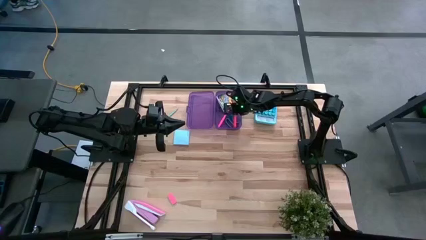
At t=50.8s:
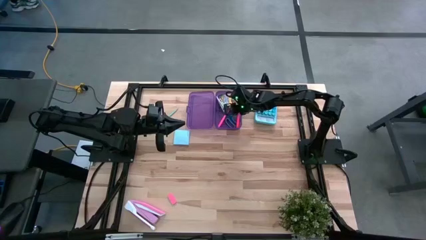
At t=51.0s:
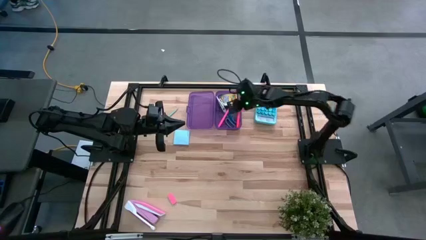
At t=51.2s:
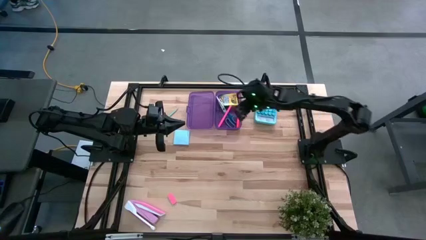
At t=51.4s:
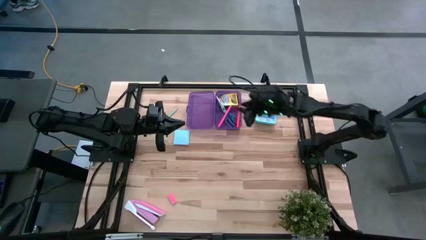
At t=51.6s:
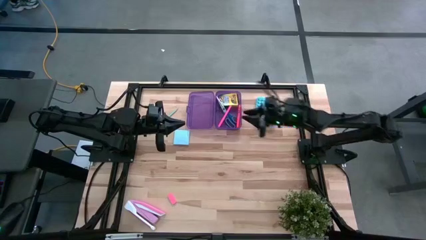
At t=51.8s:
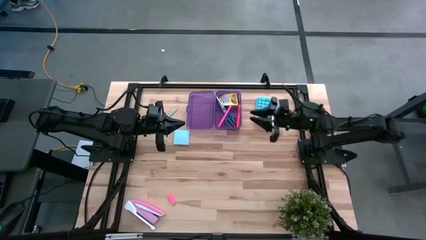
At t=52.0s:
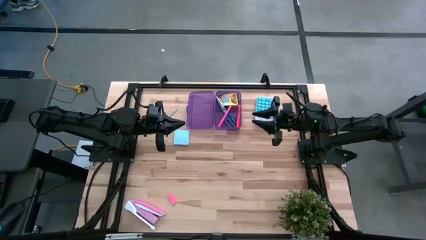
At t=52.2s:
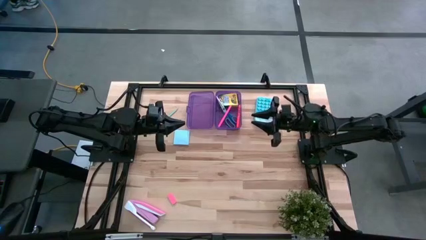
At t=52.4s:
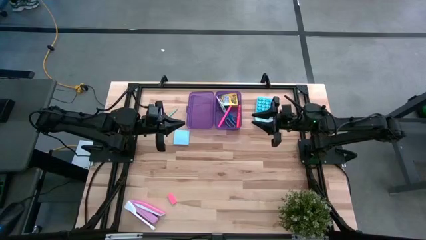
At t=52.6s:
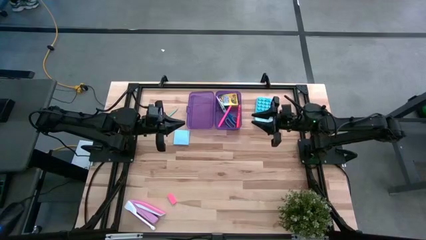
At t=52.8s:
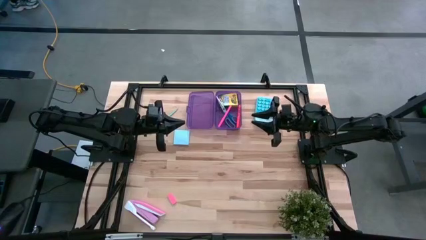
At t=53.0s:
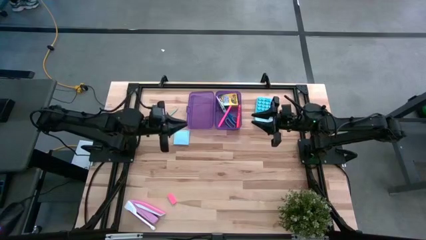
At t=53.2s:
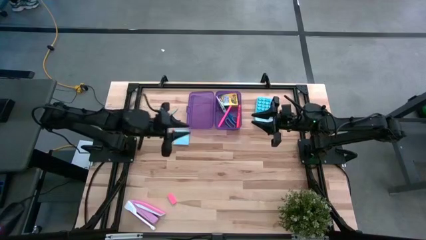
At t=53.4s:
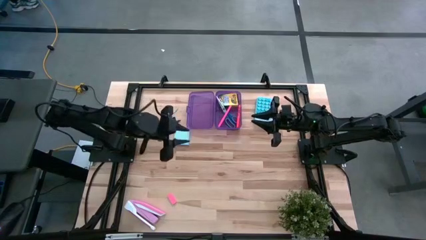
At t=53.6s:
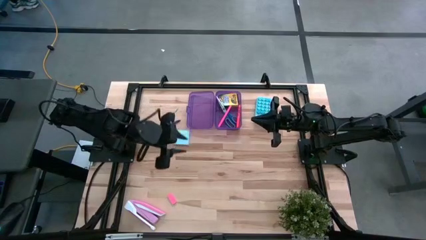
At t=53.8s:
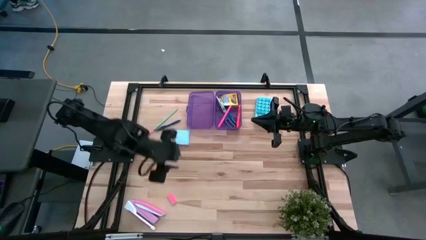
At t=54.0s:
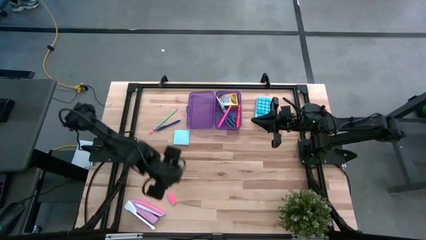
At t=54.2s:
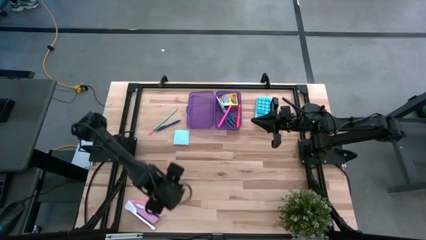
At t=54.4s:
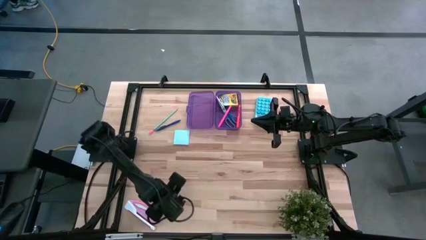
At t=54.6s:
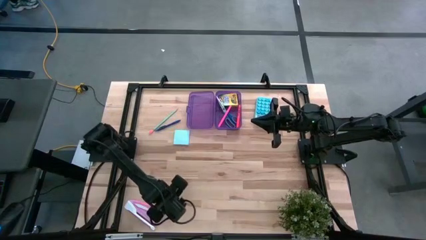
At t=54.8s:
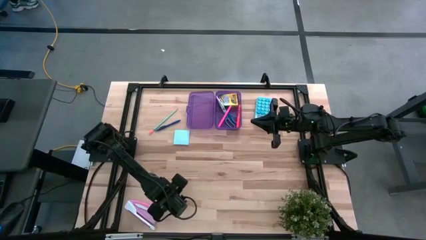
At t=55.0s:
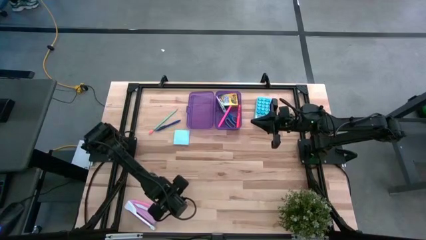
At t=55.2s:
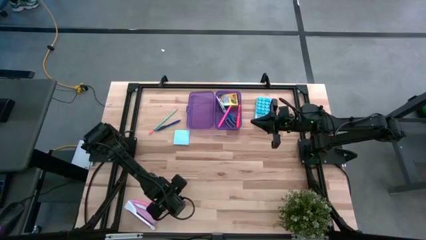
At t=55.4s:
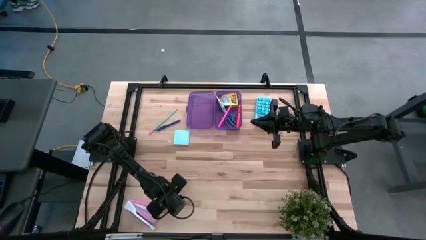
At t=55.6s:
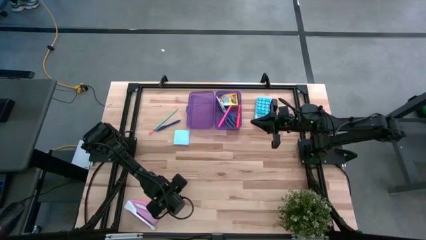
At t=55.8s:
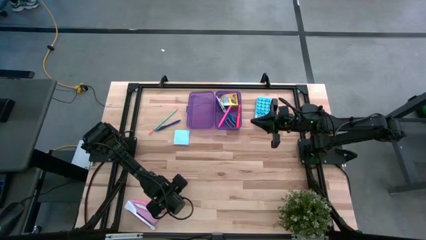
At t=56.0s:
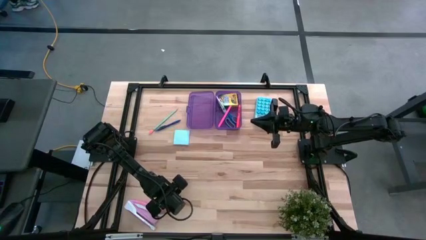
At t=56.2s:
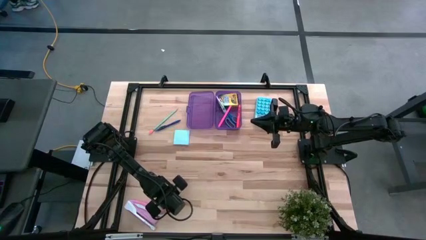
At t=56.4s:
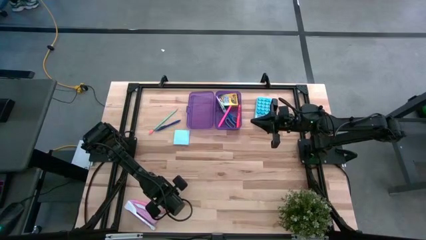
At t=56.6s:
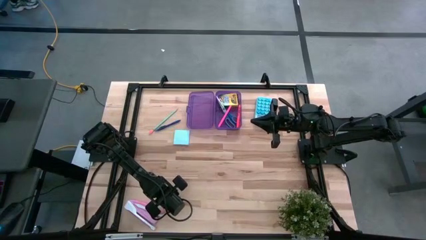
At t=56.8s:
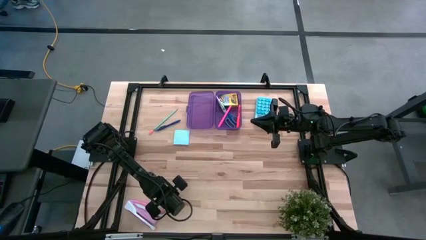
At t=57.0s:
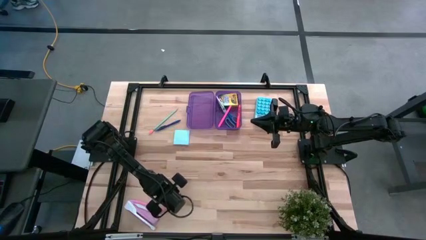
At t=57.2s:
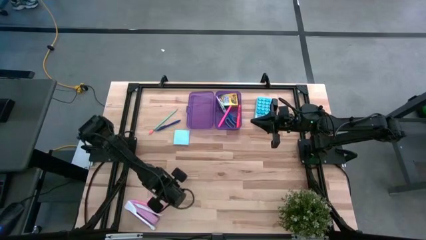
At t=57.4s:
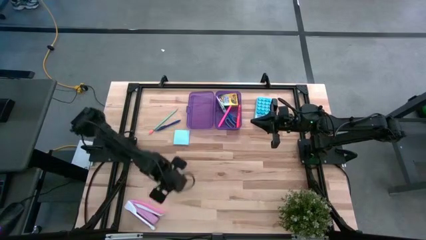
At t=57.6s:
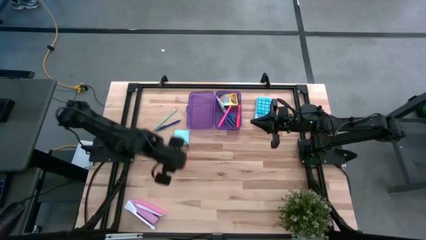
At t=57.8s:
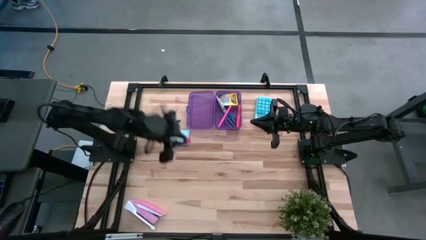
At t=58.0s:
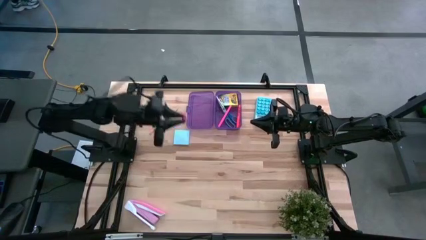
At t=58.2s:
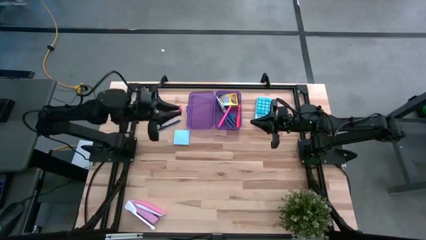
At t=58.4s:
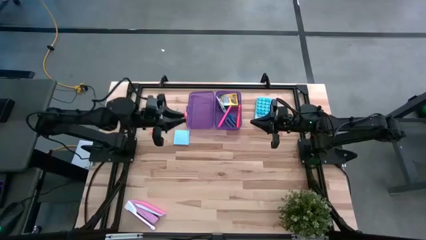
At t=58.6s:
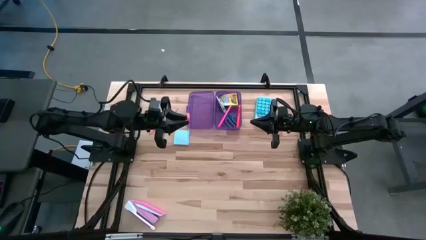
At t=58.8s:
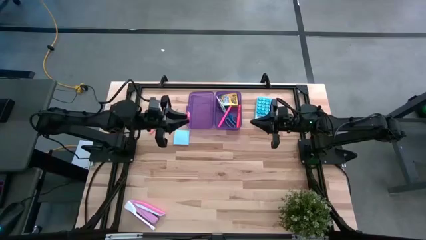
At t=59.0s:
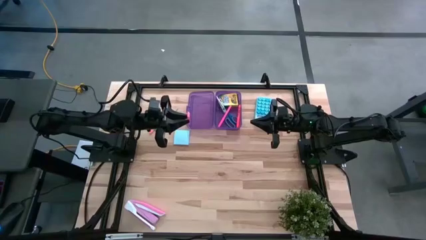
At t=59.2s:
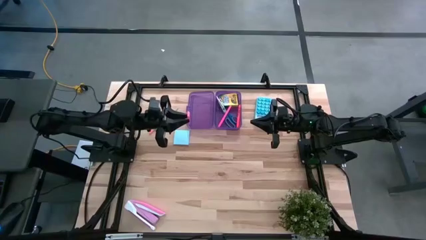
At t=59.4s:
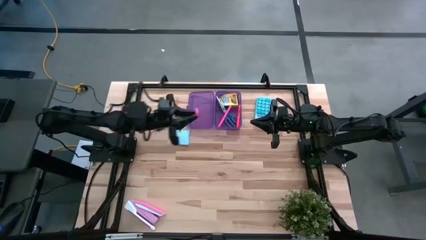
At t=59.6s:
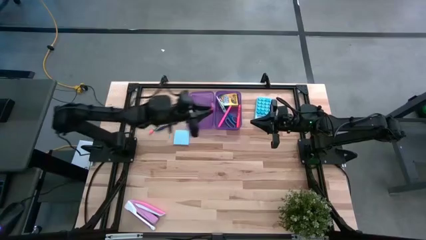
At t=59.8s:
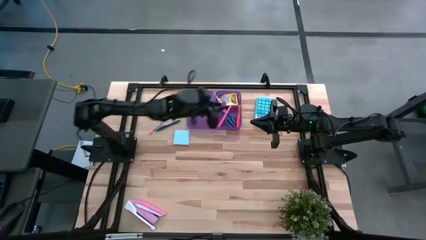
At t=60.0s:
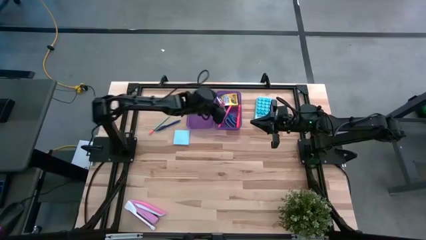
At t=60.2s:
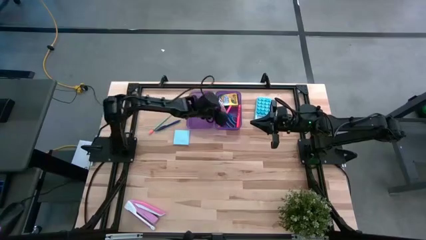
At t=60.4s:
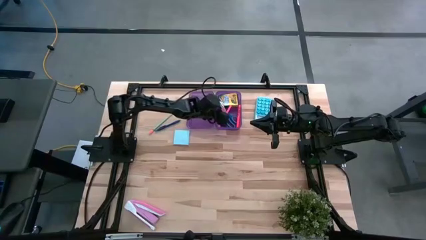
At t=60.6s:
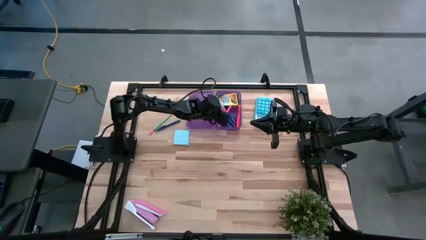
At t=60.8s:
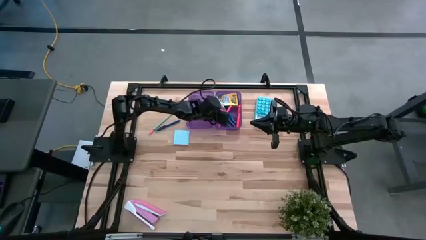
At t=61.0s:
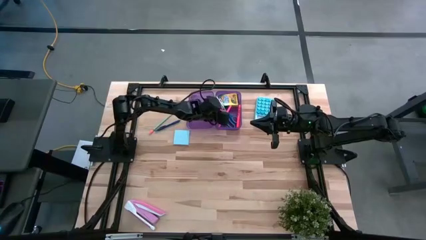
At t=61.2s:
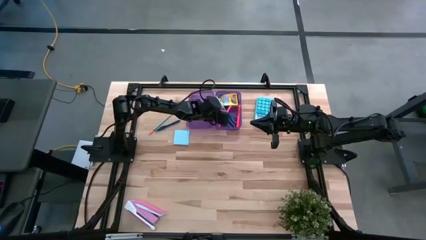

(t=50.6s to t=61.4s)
Task: Pack school essentials
Put the pink eraser into the purple supply box
